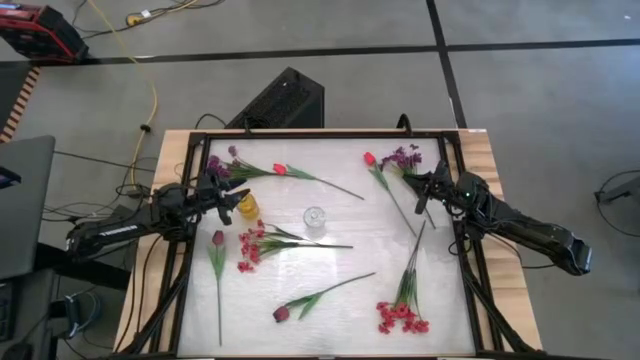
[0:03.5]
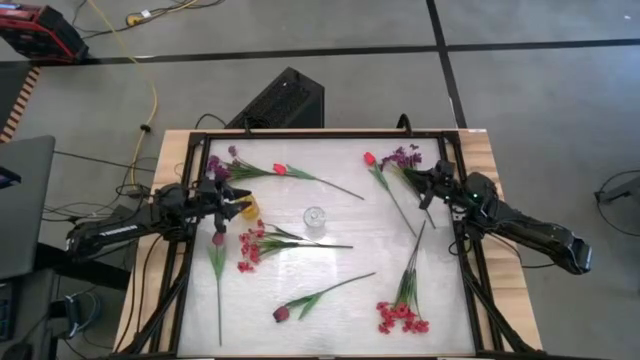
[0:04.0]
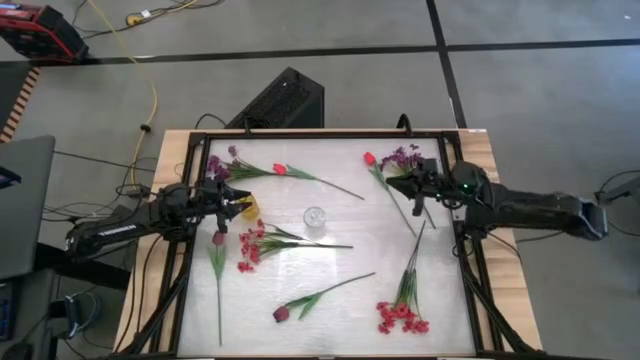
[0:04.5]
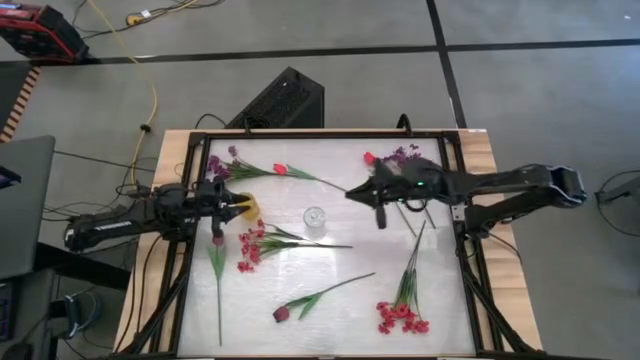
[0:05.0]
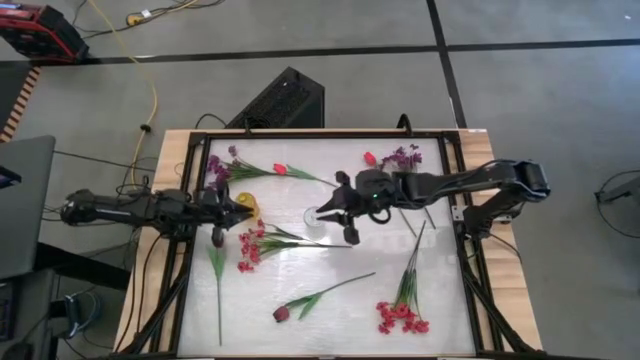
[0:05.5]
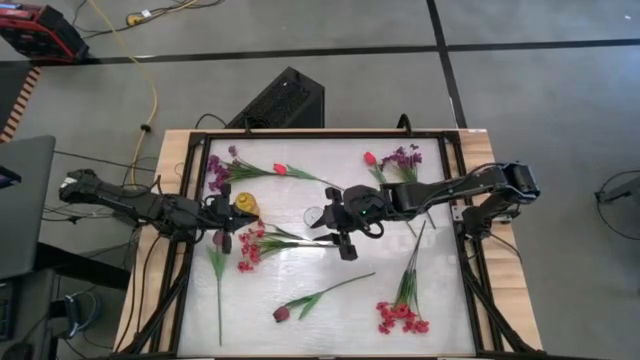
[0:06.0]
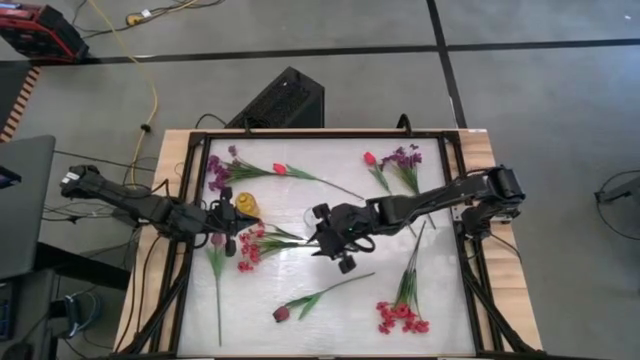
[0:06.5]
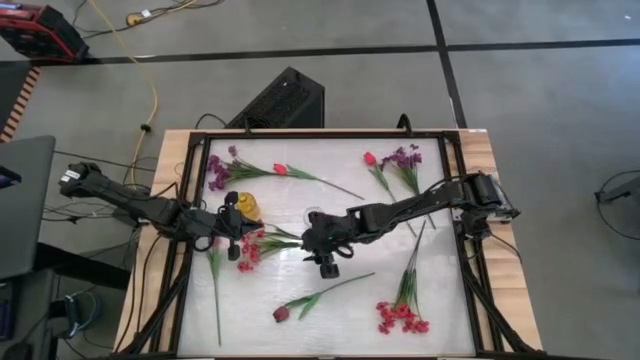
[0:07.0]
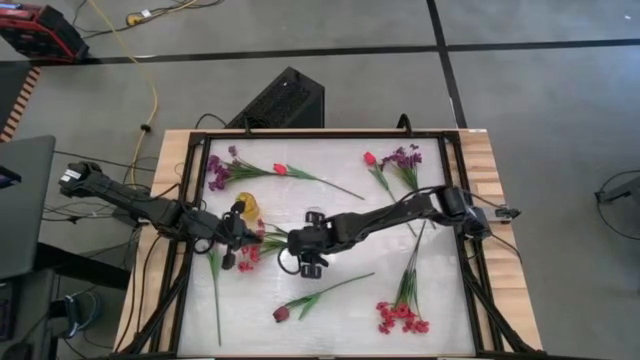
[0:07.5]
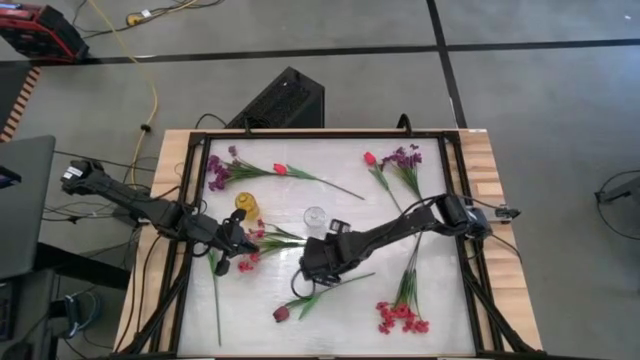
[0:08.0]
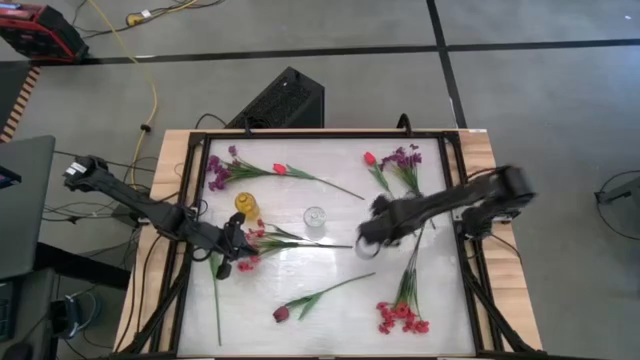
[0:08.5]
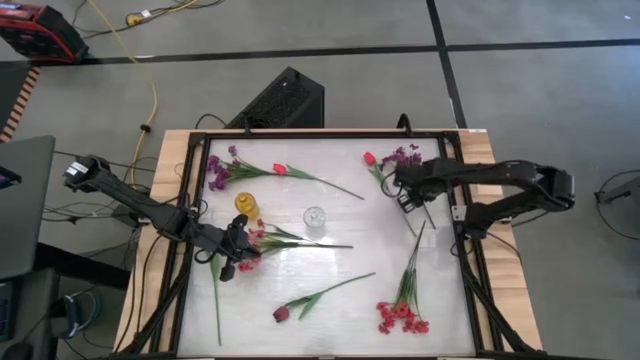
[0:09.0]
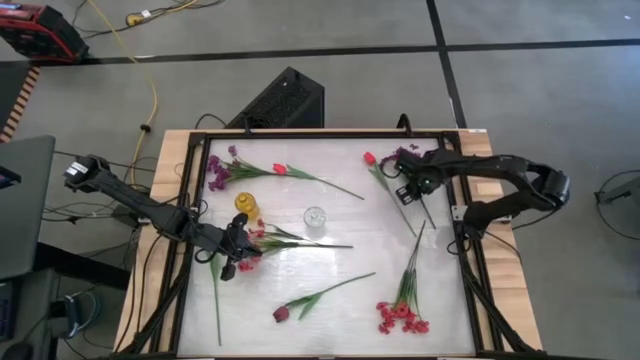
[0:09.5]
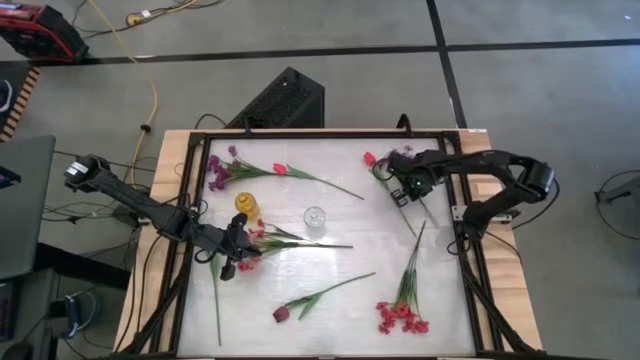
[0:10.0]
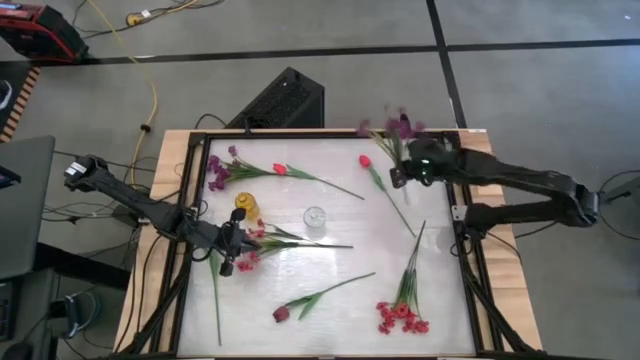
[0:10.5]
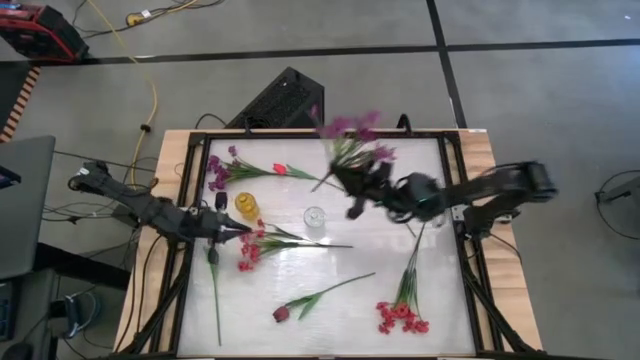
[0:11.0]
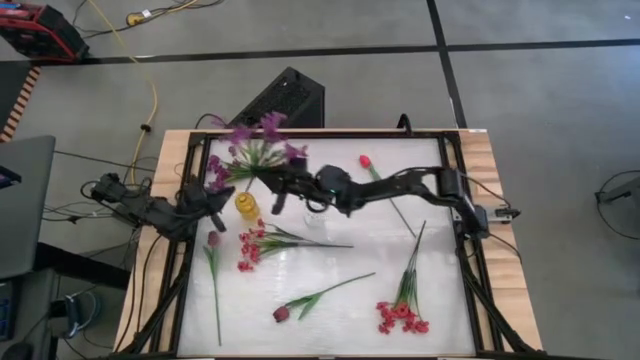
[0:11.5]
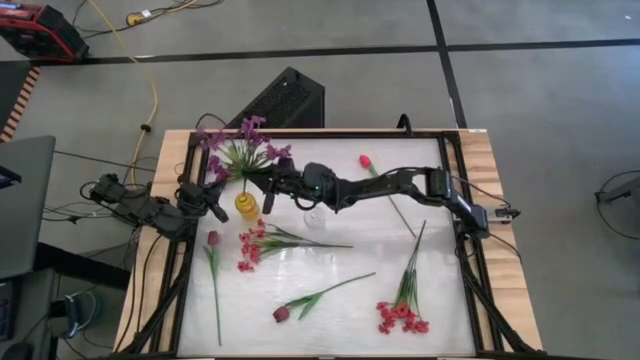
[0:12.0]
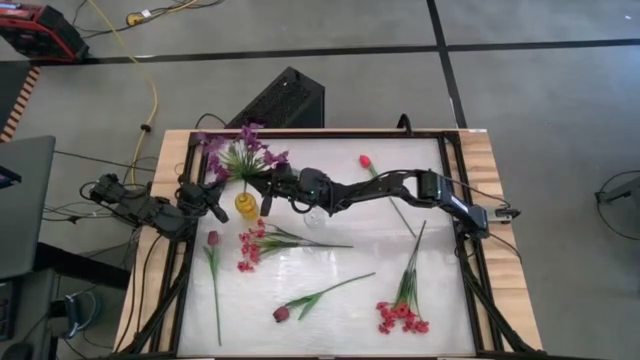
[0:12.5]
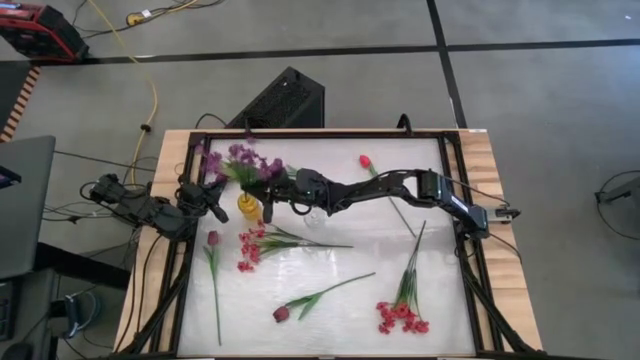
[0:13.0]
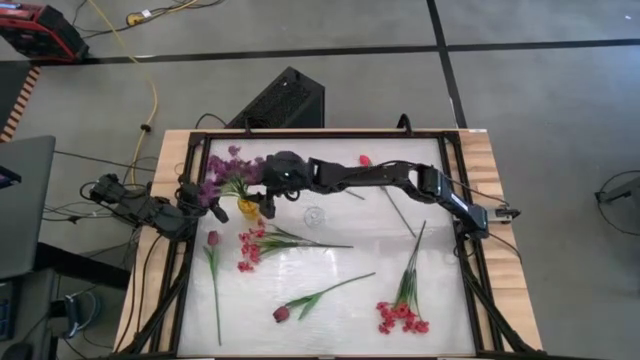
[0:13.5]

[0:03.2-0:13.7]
Task: Sort flowers into vase by color
Put the violet flower into the yellow vase

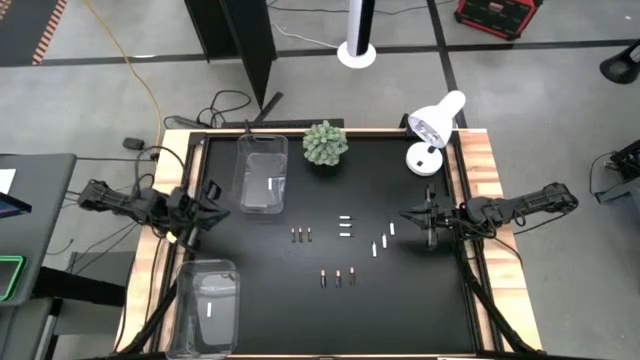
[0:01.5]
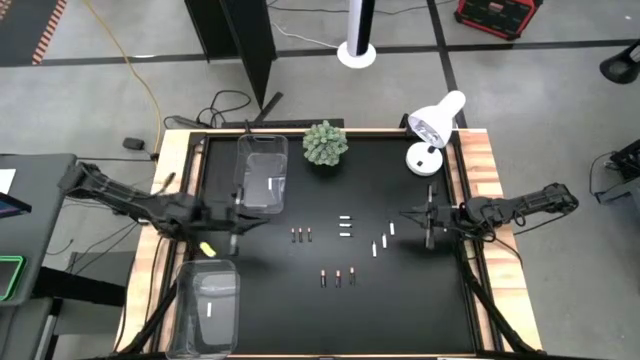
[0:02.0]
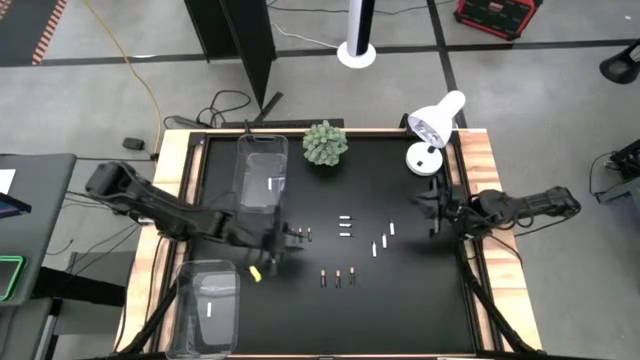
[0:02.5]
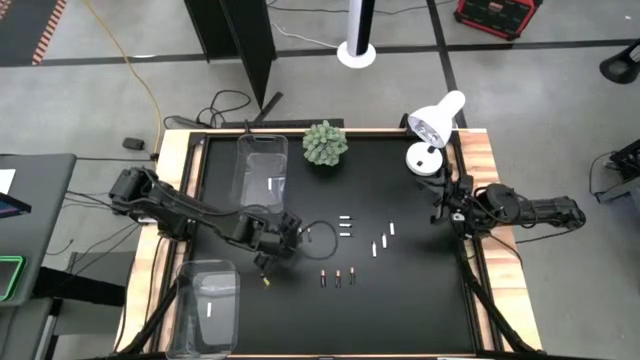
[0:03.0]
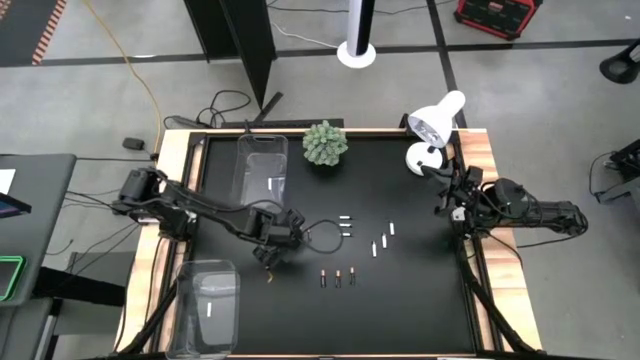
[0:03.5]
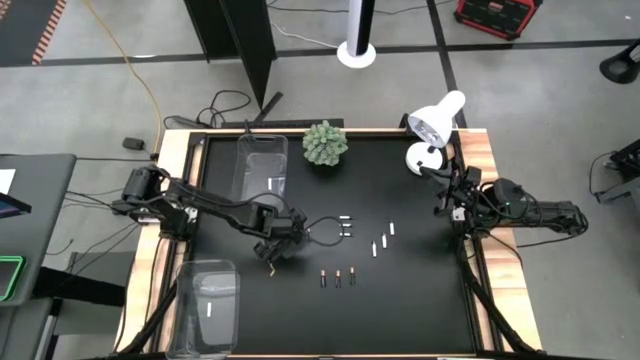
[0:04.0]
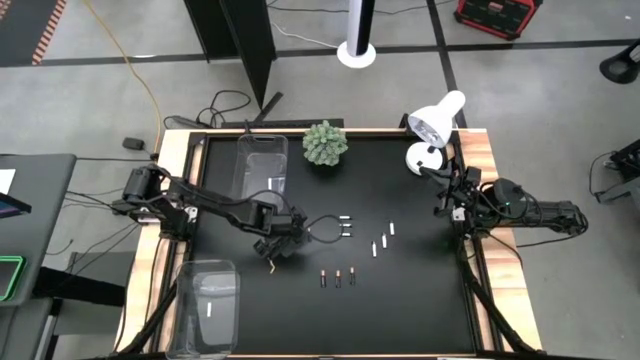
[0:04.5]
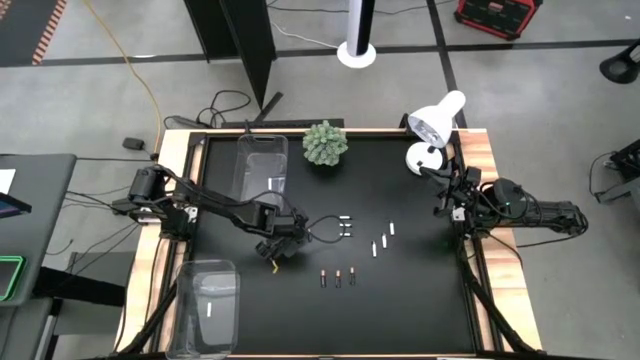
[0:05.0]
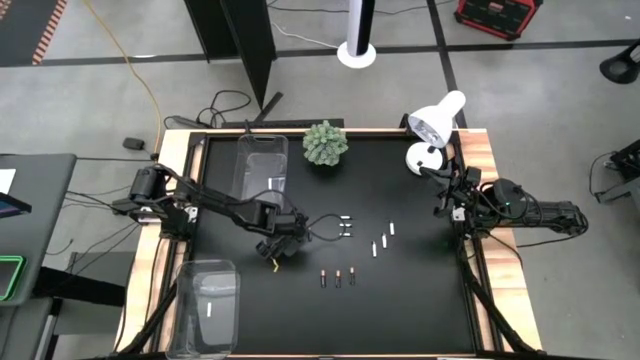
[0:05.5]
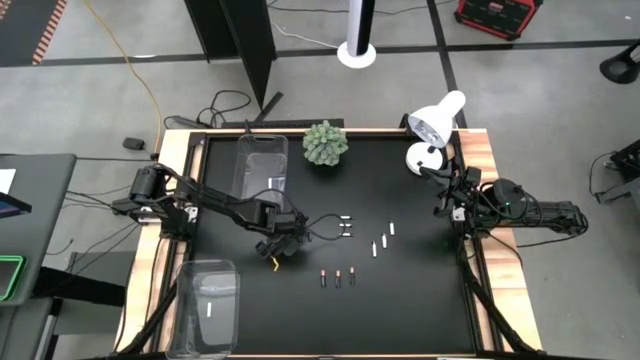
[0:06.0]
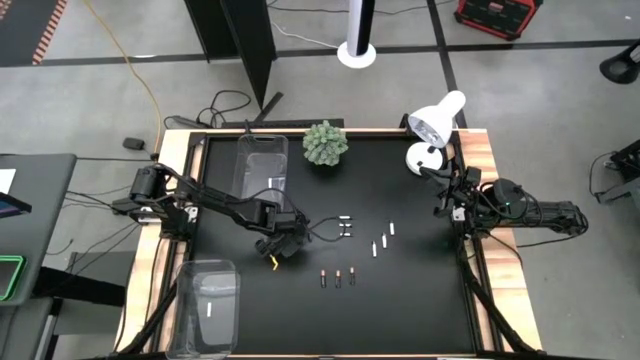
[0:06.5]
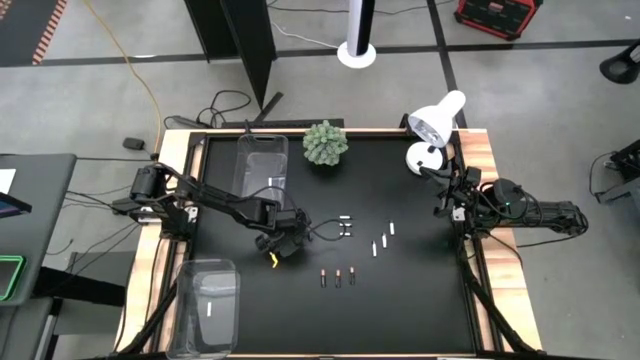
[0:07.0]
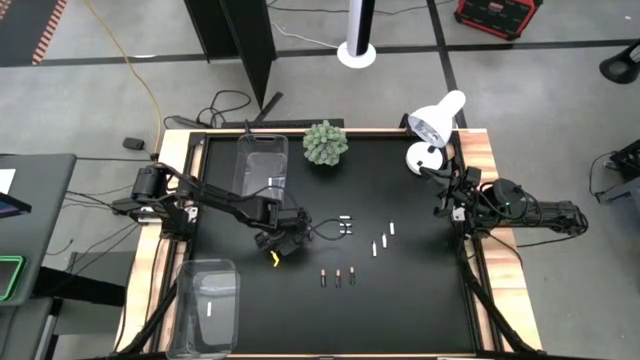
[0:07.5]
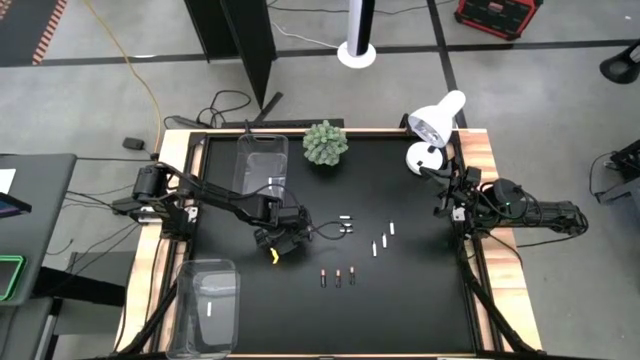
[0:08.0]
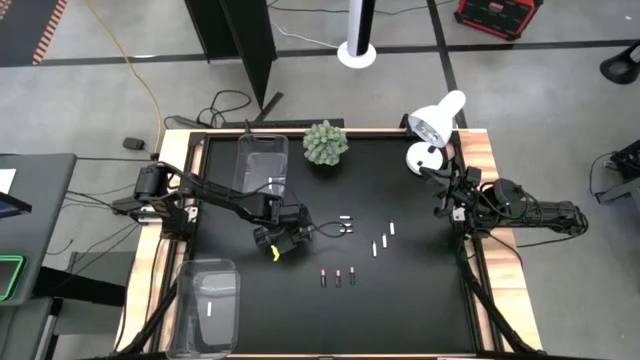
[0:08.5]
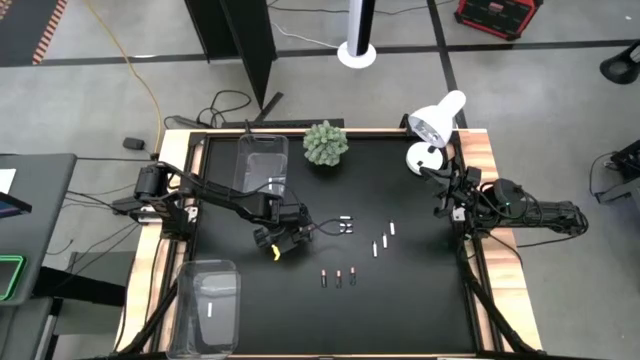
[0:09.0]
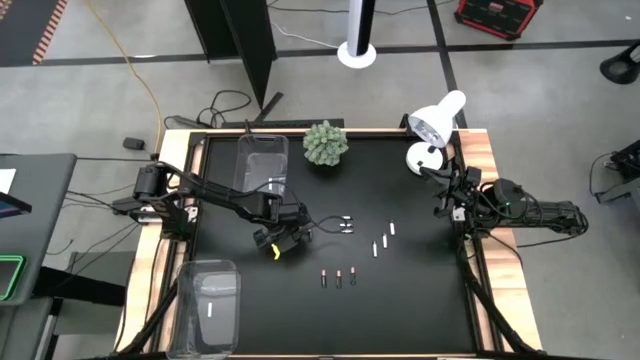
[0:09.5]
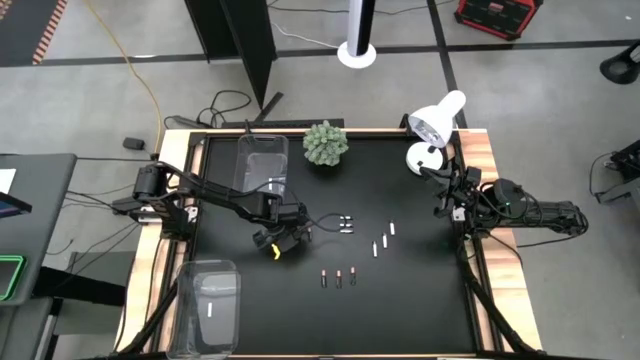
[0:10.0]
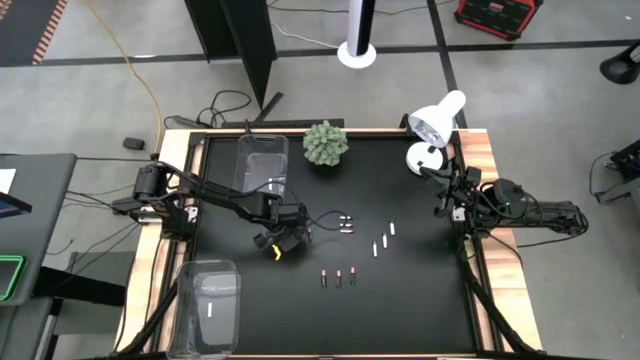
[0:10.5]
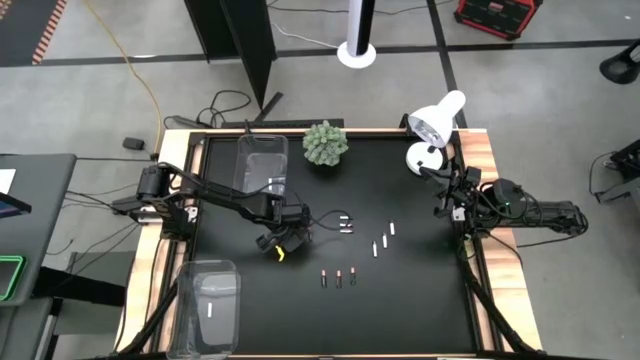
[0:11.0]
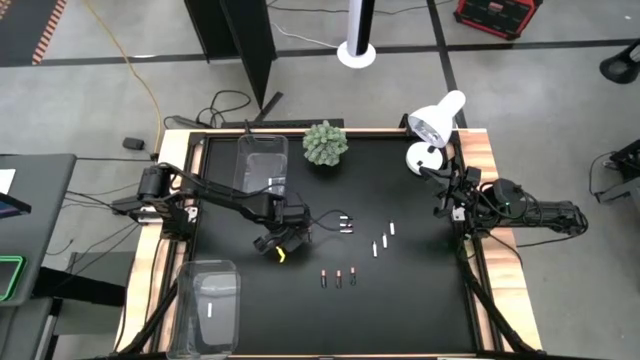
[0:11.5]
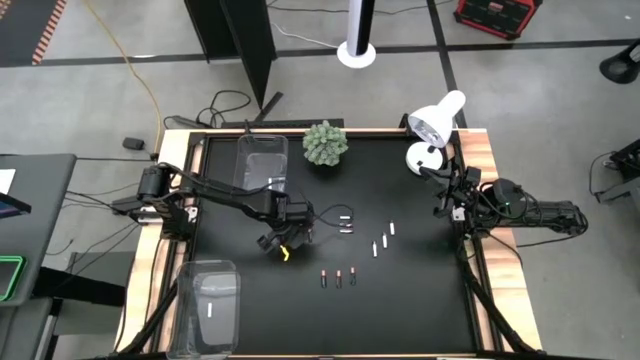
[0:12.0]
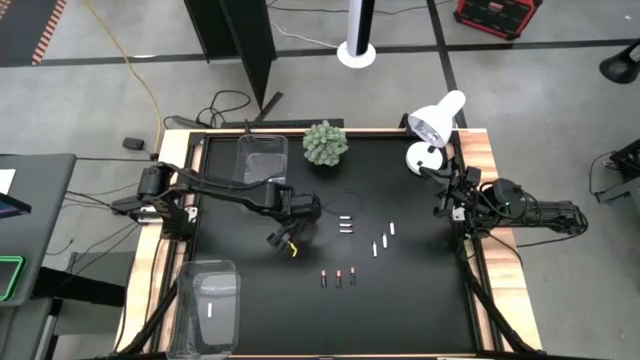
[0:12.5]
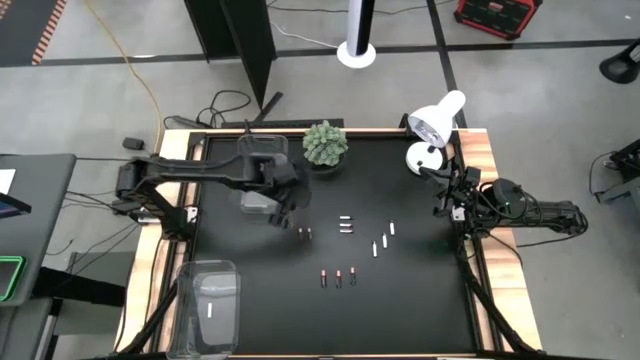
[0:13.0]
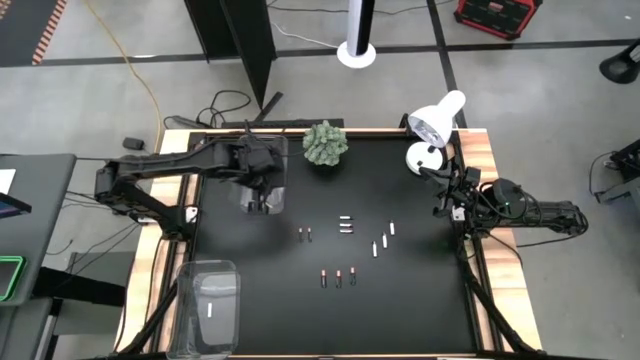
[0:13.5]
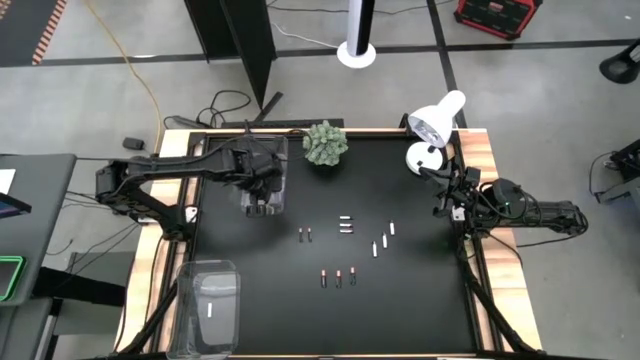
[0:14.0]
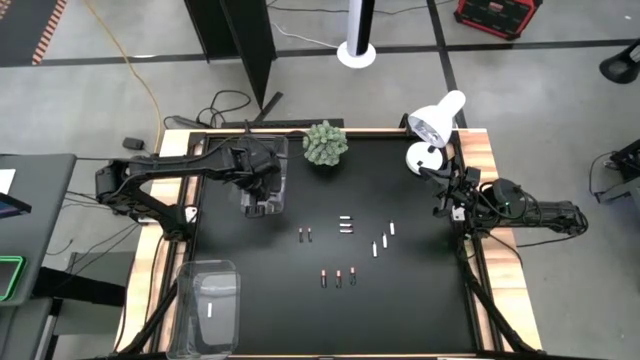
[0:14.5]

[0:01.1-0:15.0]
Task: Sort batteries
Put the copper and black battery into the top transparent bin
